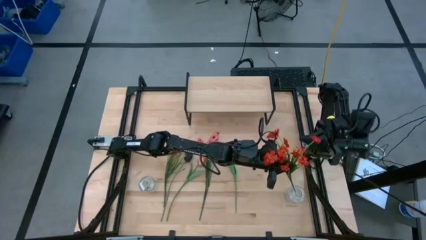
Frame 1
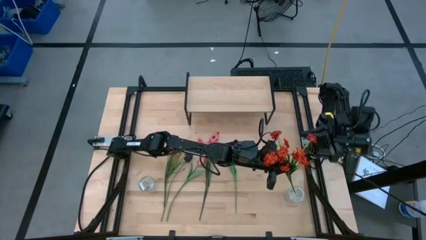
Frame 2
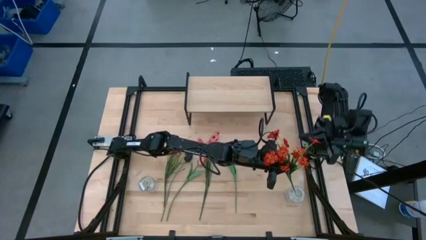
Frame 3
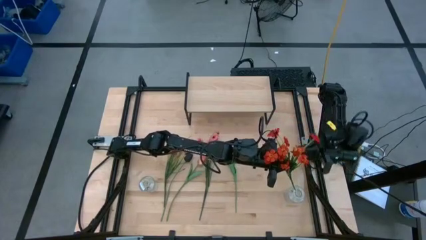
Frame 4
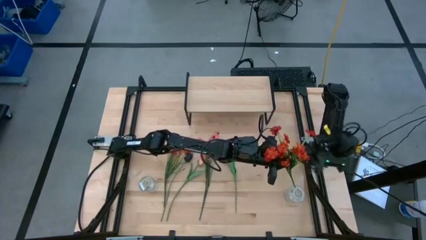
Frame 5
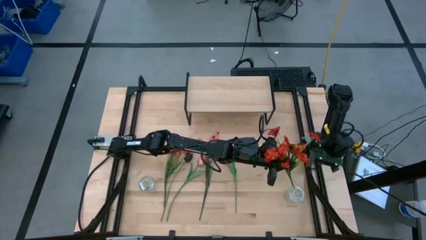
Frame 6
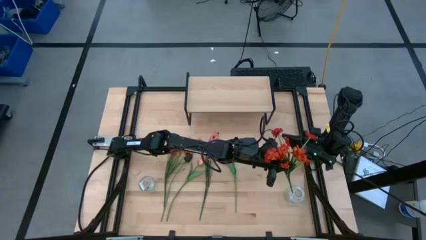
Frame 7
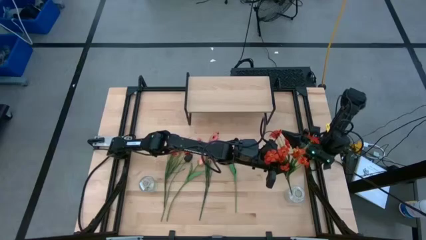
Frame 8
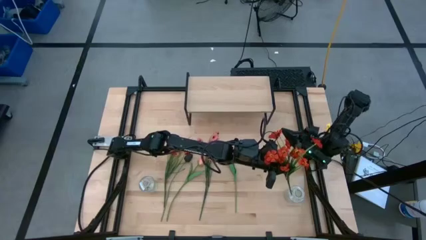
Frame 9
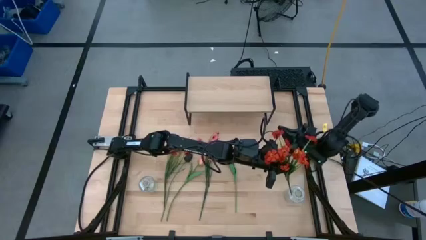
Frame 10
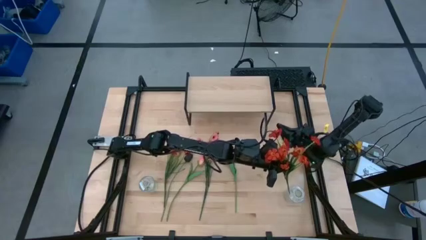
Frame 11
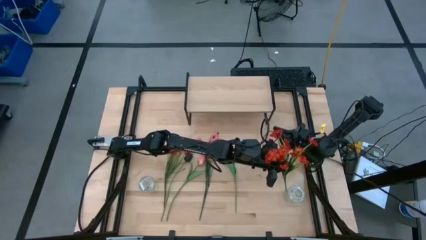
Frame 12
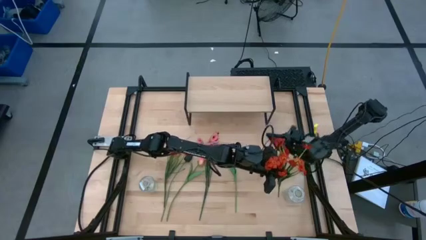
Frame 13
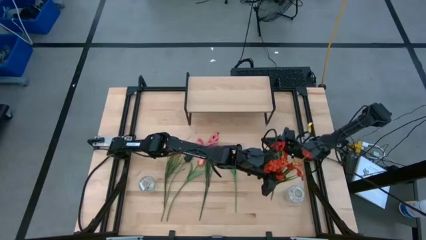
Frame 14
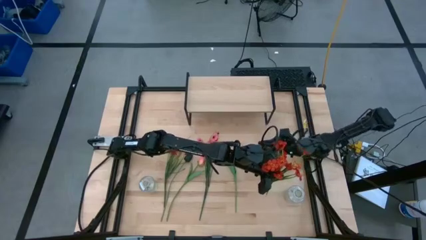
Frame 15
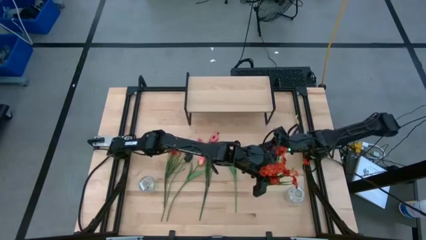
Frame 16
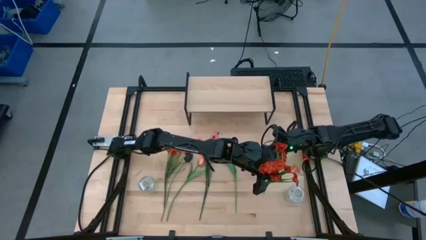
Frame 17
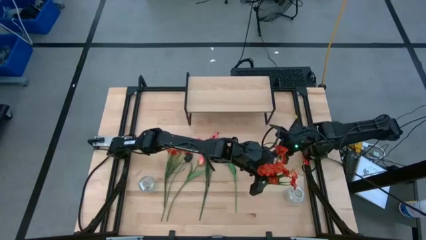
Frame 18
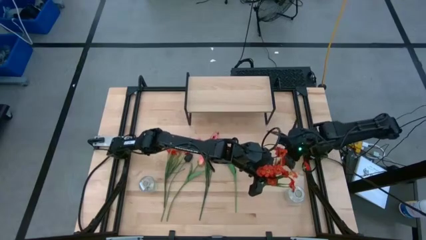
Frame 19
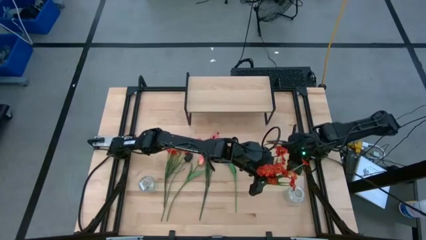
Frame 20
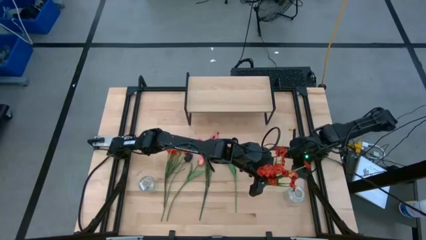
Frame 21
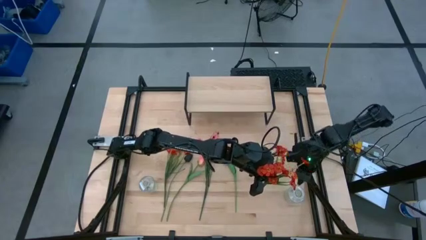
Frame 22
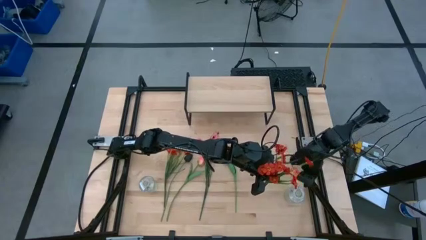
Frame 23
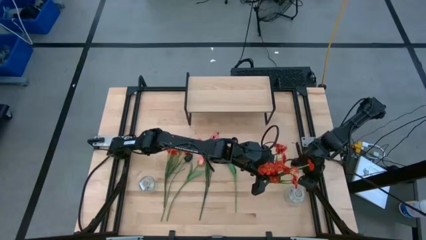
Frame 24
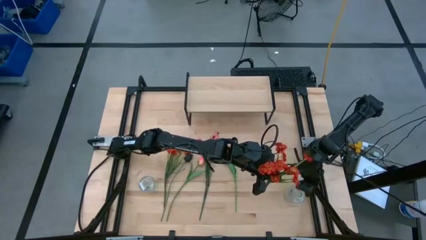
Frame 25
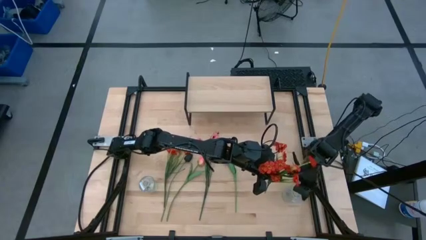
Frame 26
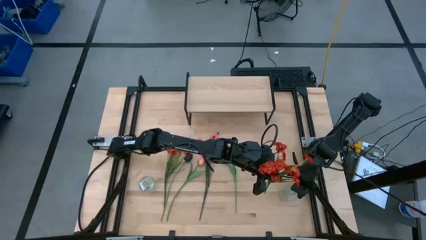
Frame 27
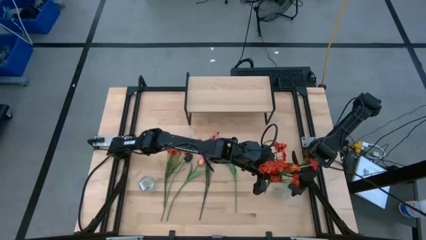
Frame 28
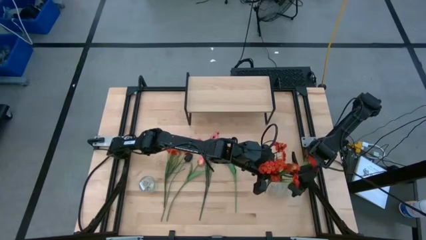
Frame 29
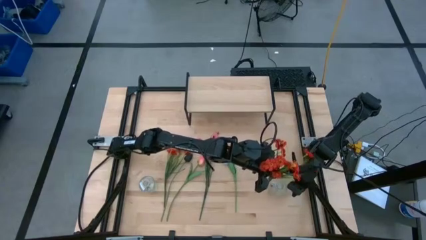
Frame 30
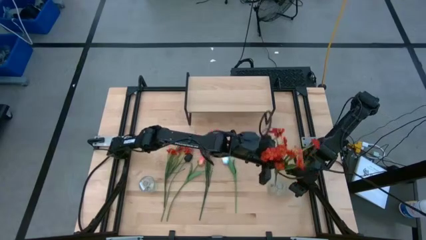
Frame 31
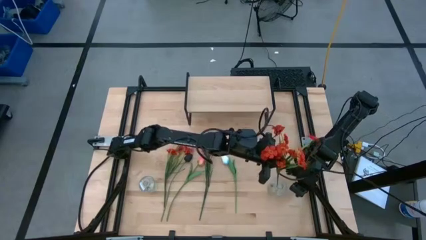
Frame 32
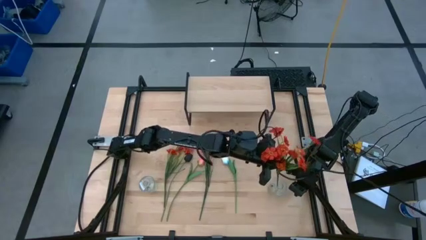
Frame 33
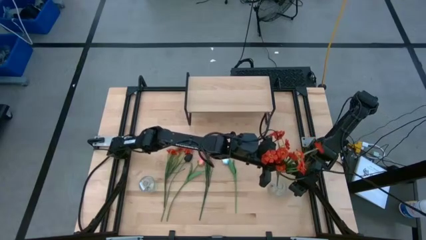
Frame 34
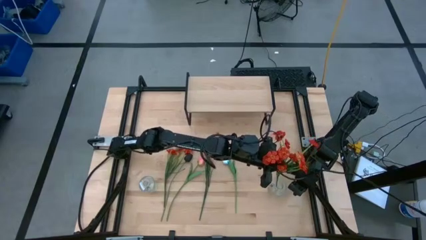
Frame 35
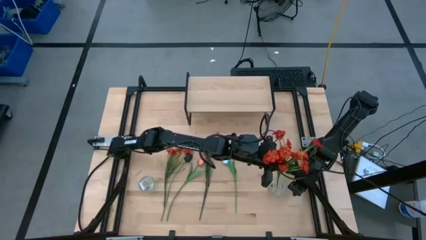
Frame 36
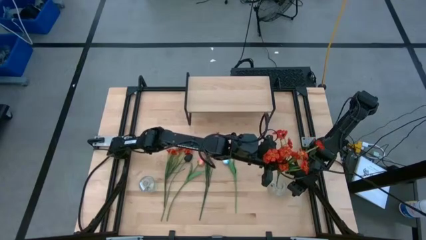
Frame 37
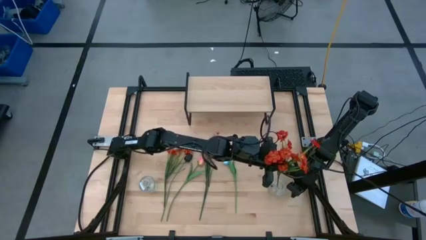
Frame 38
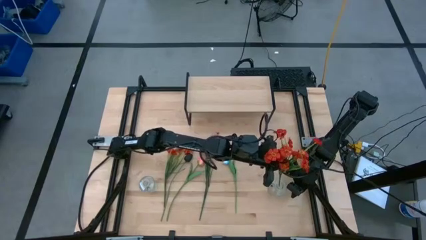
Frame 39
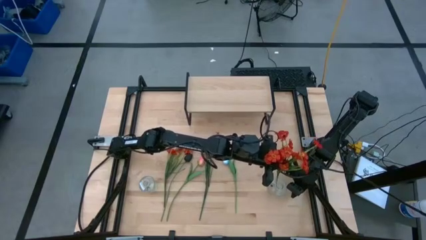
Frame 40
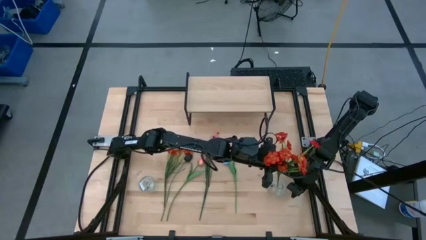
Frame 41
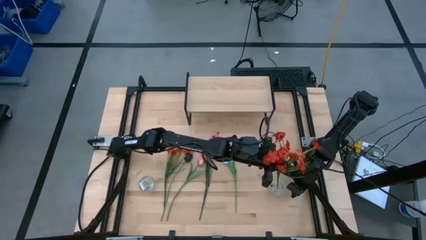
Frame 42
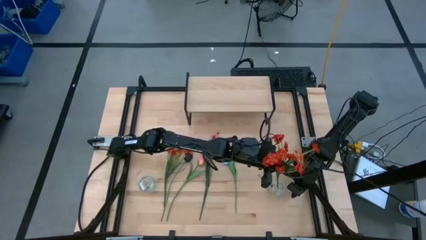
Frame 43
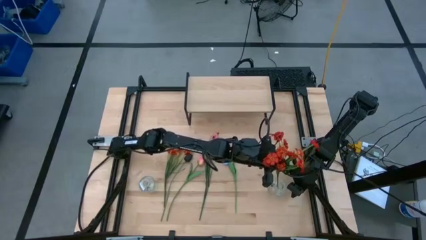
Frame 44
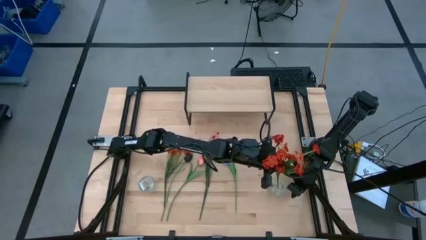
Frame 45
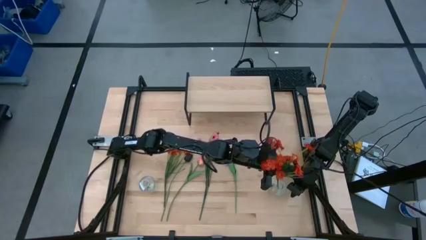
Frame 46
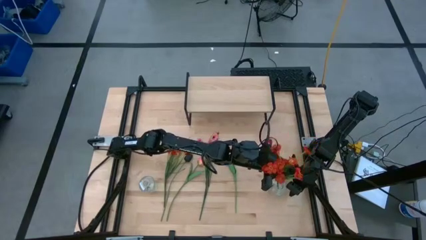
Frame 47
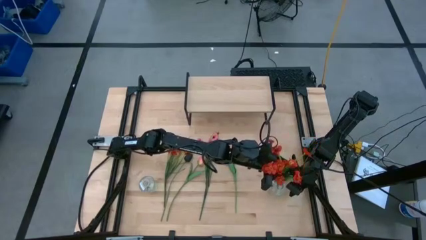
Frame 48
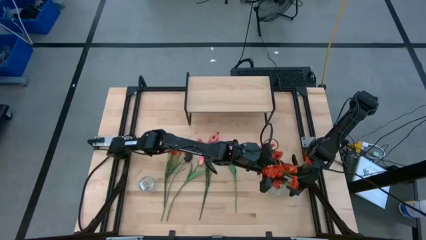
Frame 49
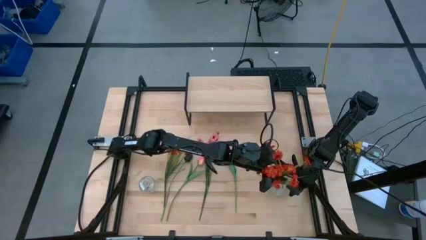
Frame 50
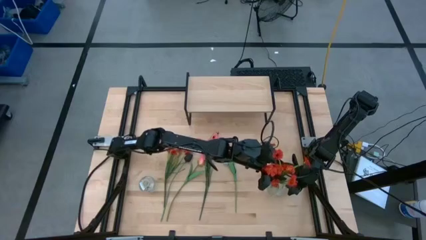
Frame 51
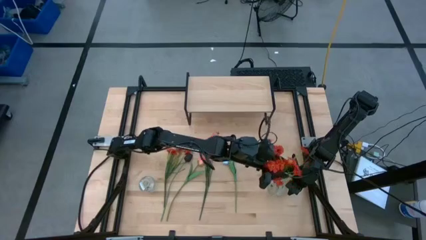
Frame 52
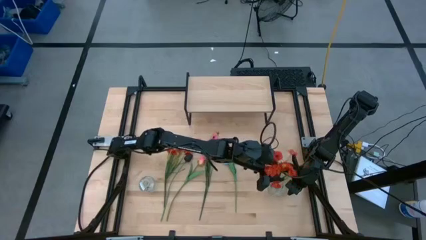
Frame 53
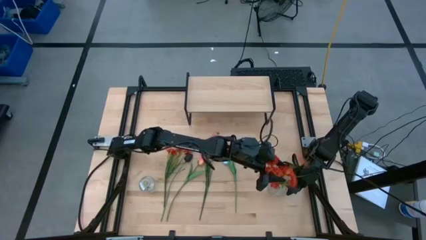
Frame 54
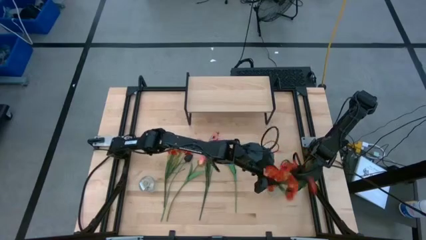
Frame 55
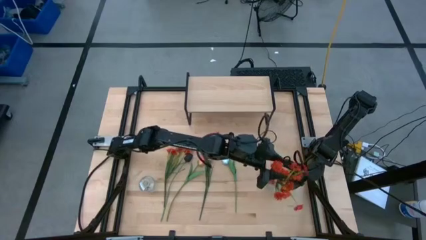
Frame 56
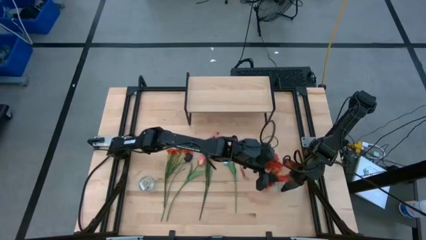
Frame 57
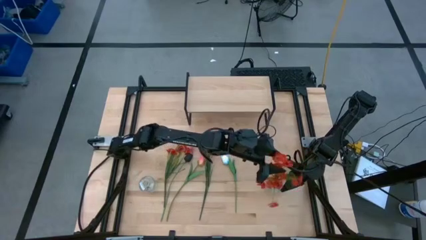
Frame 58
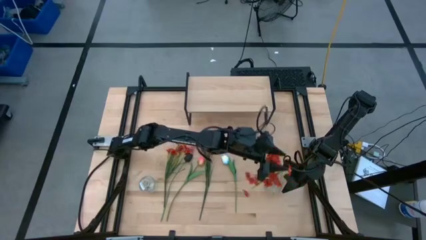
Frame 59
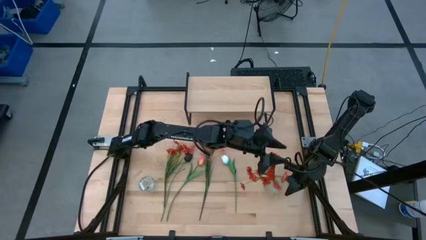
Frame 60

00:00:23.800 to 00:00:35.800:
Task: Pick and place flowers into a vace then onto a shelf
Put the right orange flowers into the right transparent vase

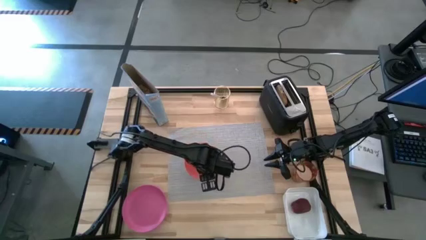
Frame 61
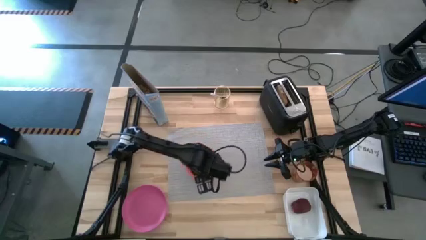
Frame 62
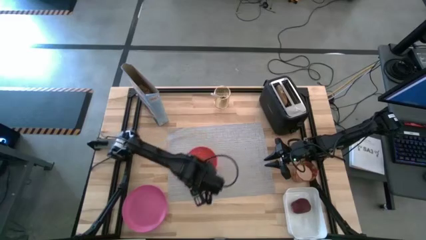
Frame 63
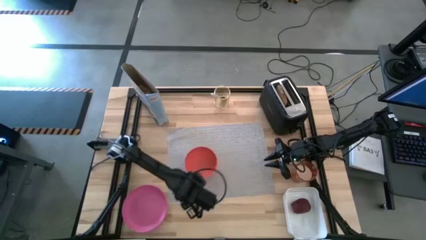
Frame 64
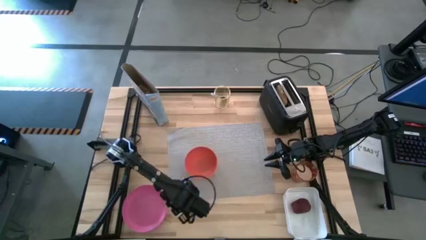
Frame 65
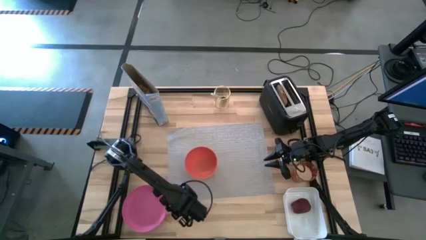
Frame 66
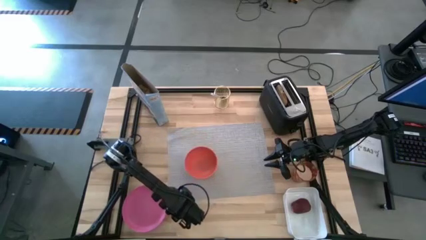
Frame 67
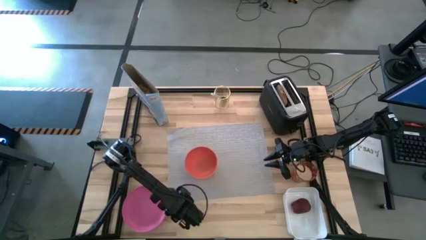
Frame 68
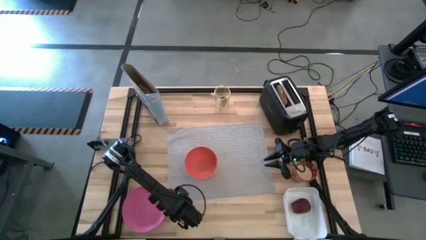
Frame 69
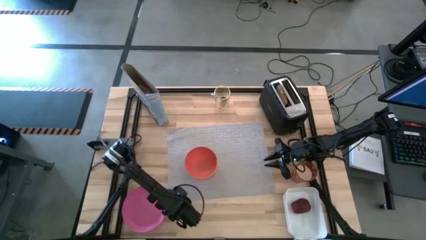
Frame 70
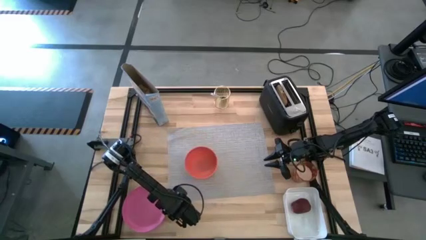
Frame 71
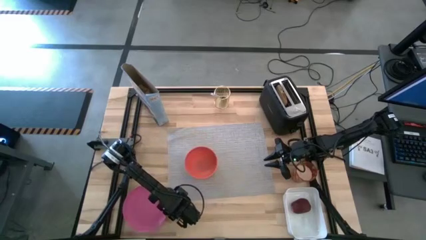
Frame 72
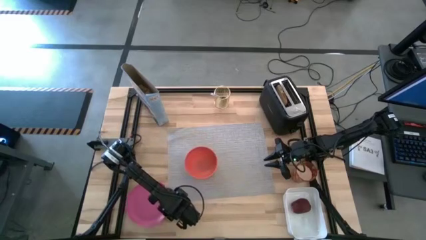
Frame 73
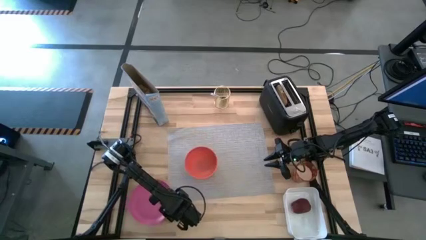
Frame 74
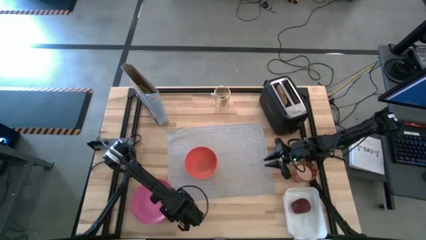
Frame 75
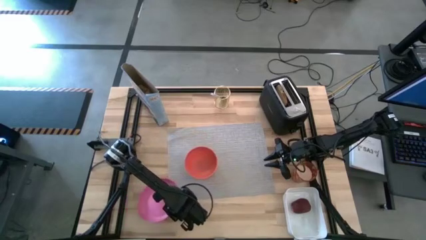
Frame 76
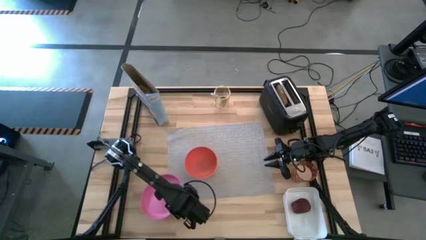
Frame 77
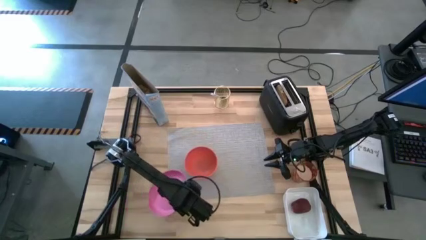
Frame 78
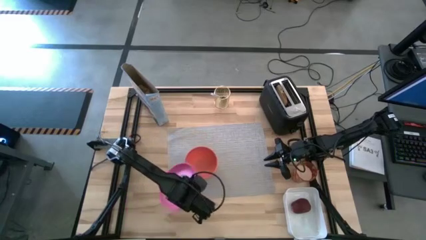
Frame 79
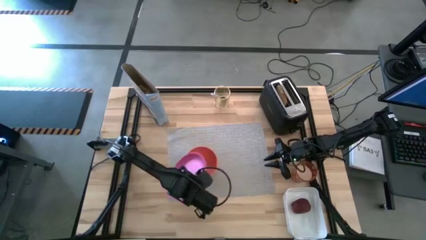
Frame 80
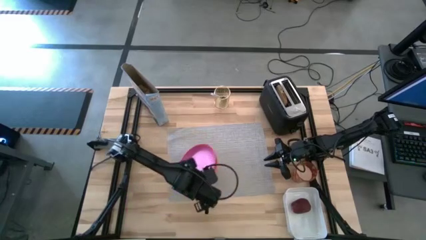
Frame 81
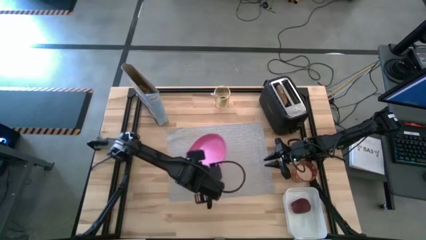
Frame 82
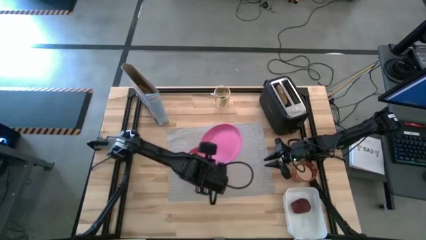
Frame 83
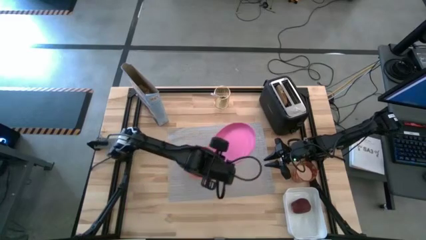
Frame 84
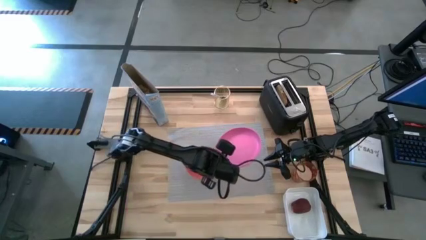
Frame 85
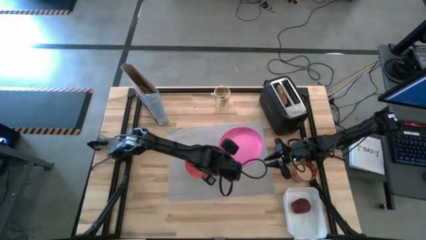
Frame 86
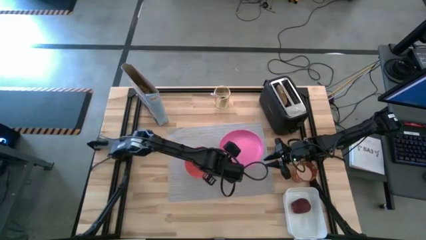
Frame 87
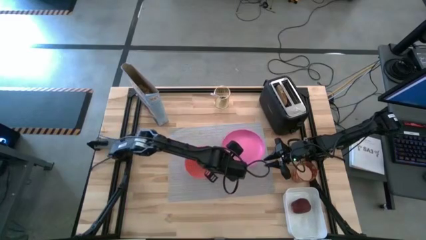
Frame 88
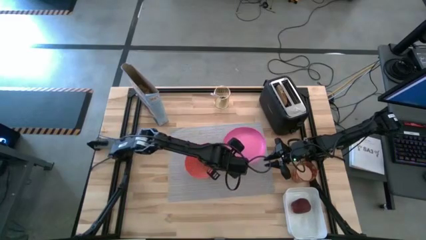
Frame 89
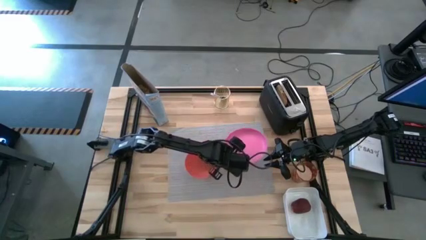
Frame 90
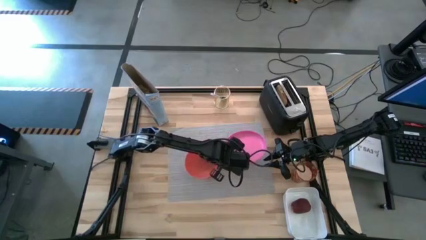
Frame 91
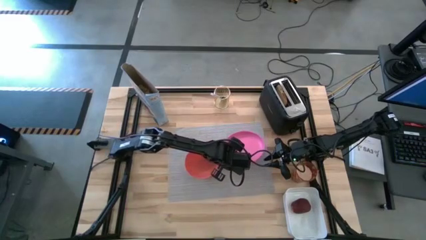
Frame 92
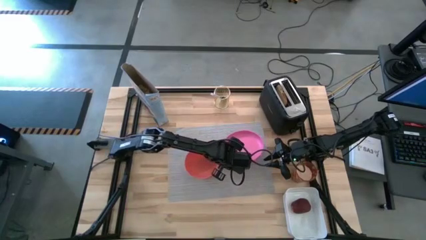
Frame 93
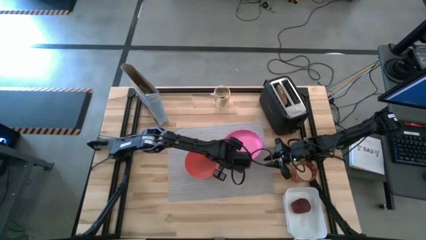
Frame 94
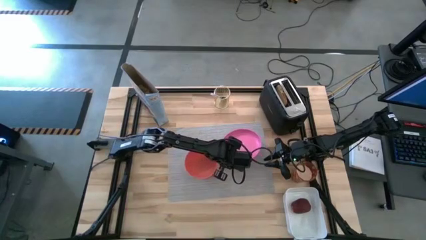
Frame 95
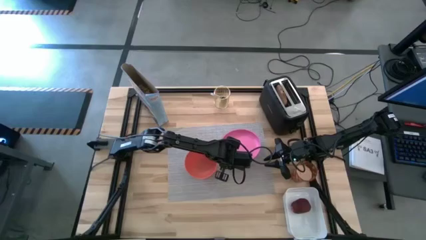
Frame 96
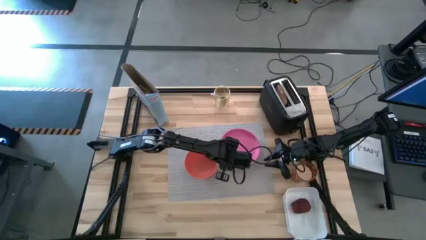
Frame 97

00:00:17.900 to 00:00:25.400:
Task: Arrange a breakfast setting
Put the pink plate on the gray table mat
